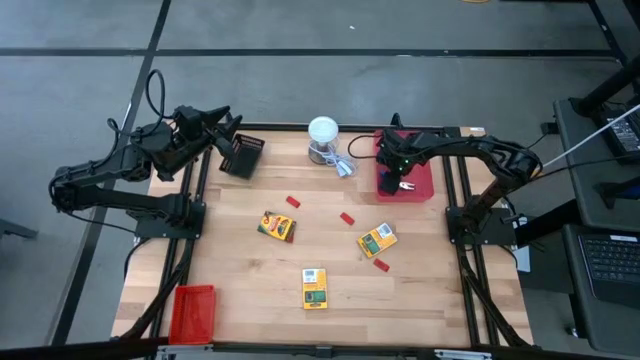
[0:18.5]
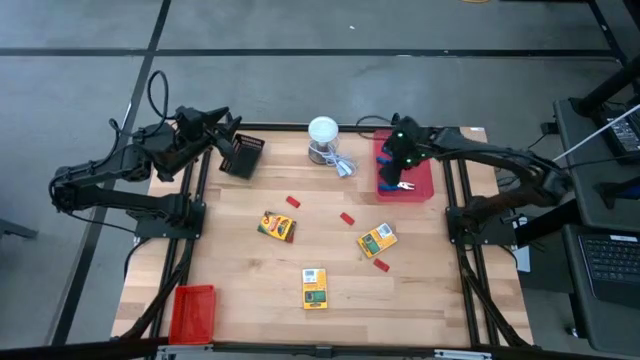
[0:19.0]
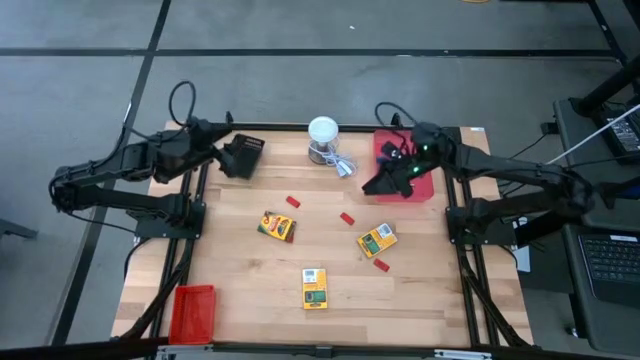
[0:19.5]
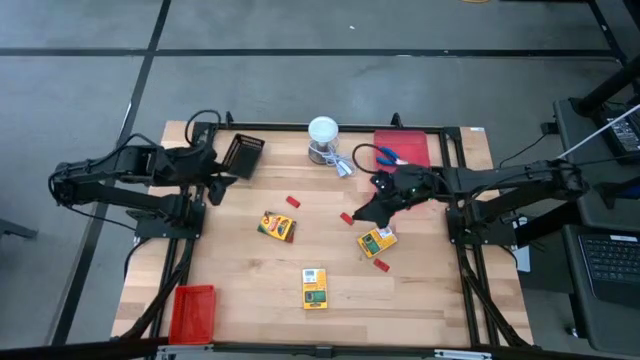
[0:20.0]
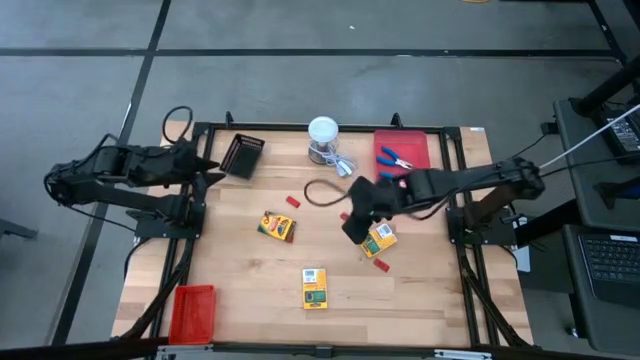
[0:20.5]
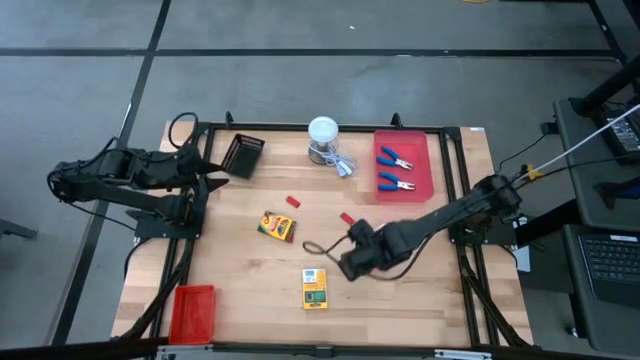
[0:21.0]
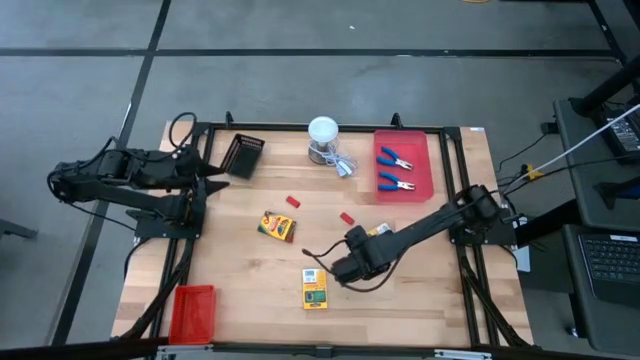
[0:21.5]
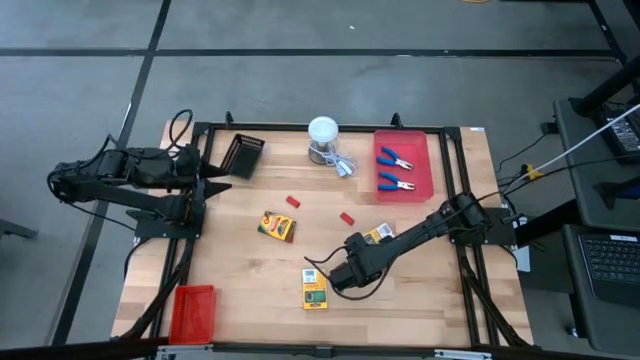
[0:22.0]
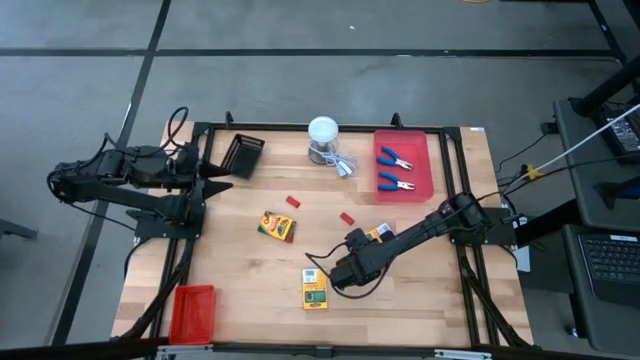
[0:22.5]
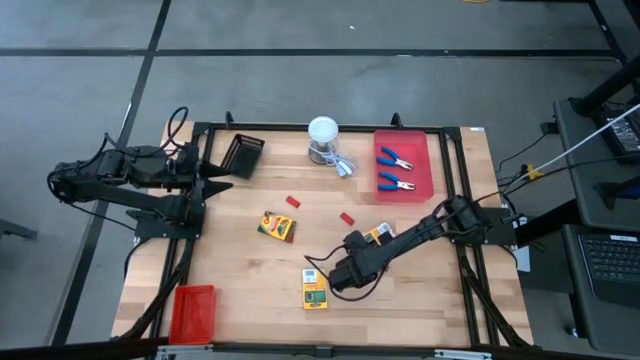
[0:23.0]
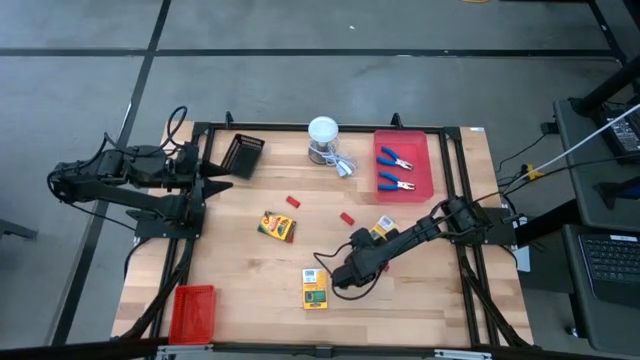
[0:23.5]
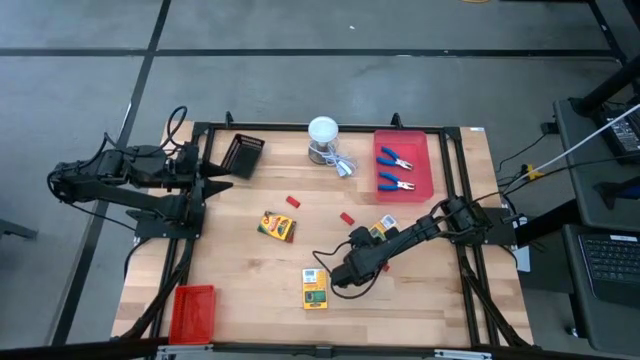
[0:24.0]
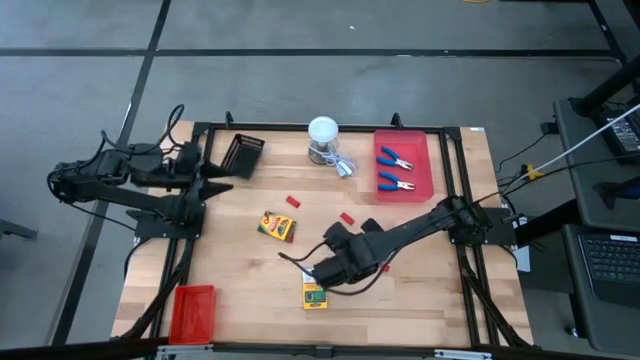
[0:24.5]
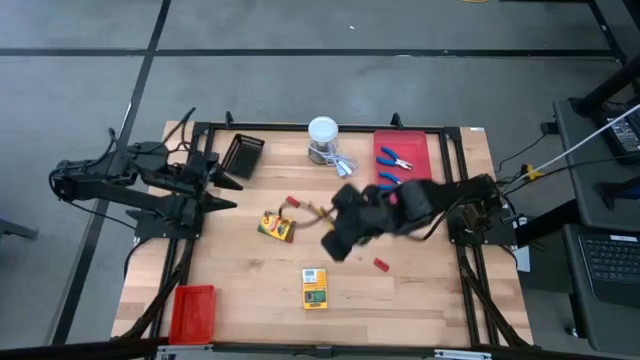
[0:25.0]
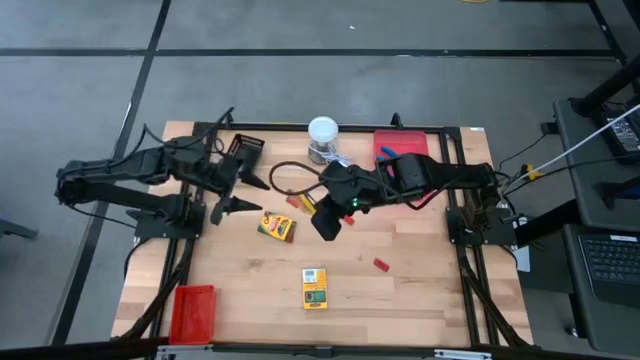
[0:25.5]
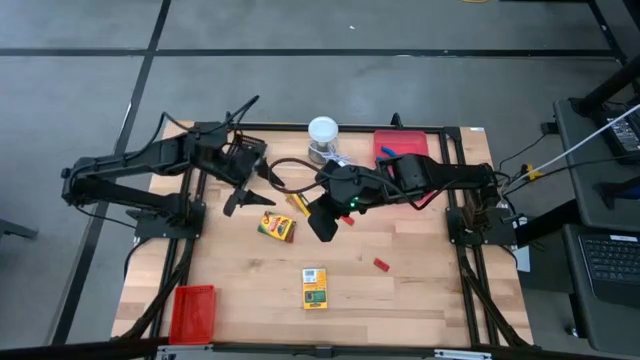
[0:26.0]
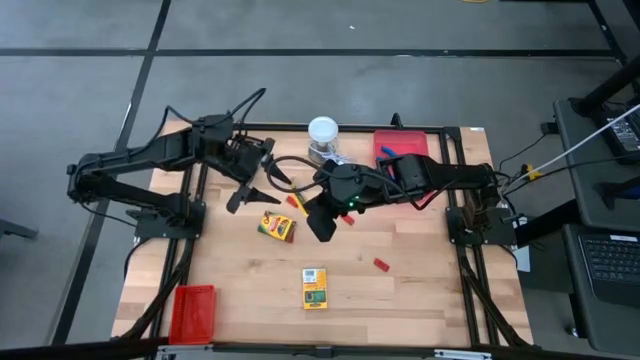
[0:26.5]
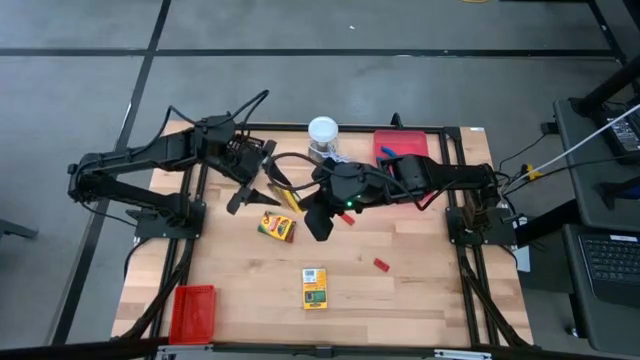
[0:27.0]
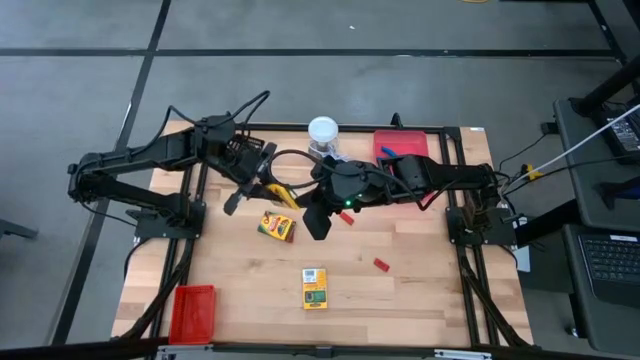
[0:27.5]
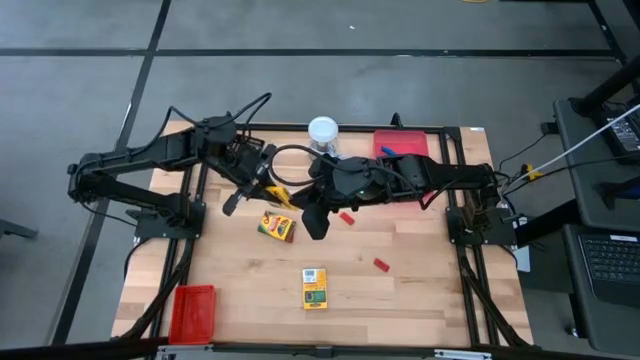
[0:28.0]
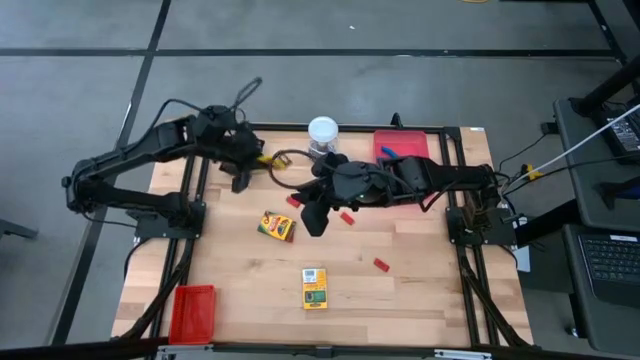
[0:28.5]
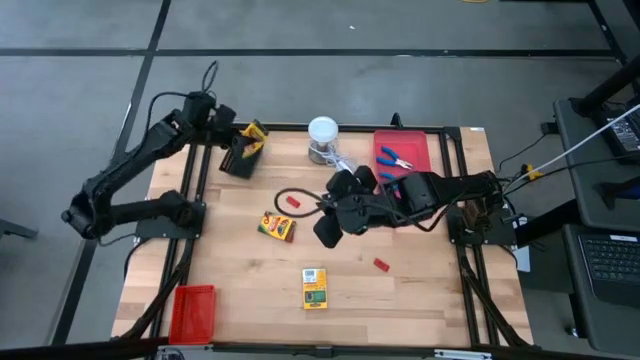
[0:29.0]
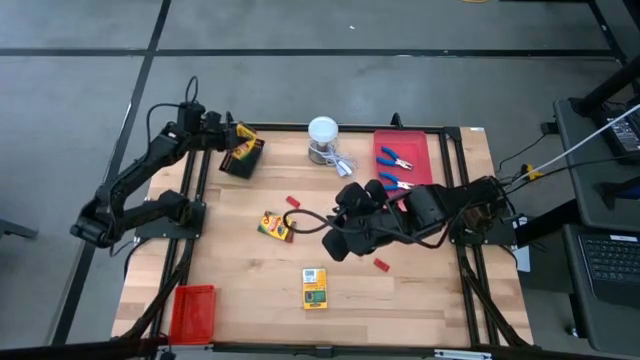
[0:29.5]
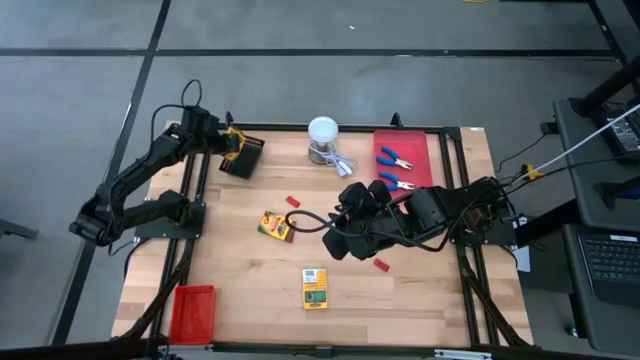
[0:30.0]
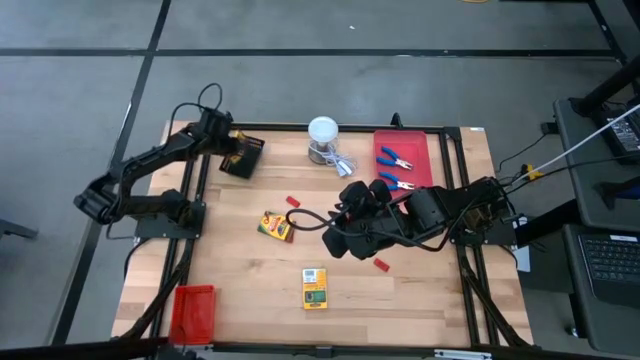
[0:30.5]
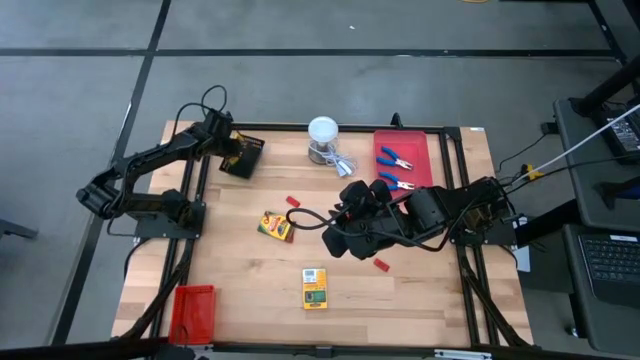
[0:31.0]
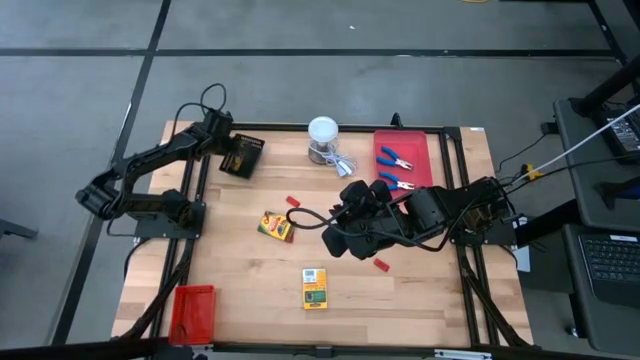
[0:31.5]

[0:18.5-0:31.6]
Task: Pick & Place School Supplies
Put the crayon box into the black bin

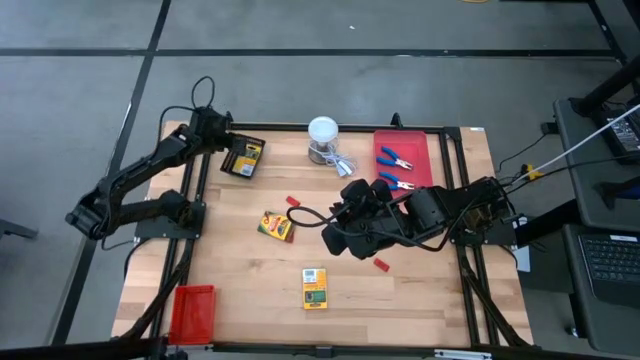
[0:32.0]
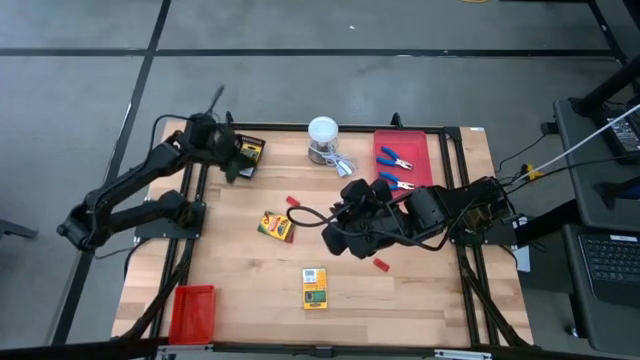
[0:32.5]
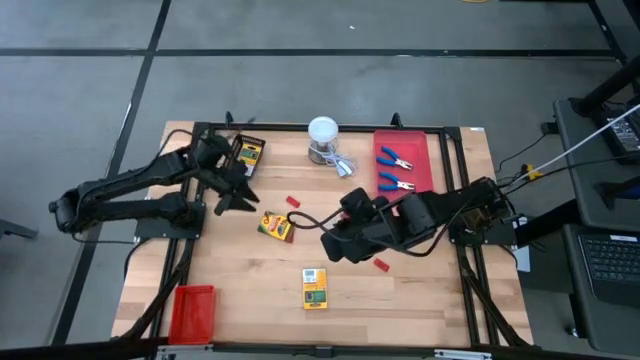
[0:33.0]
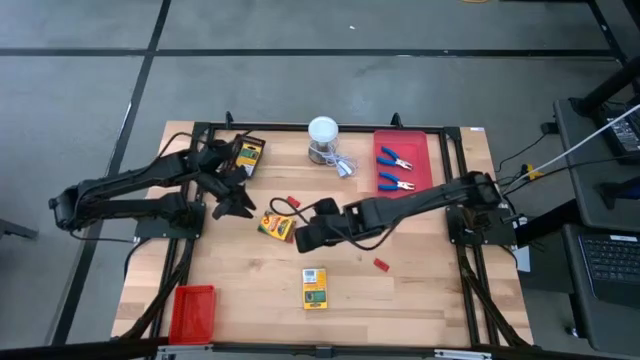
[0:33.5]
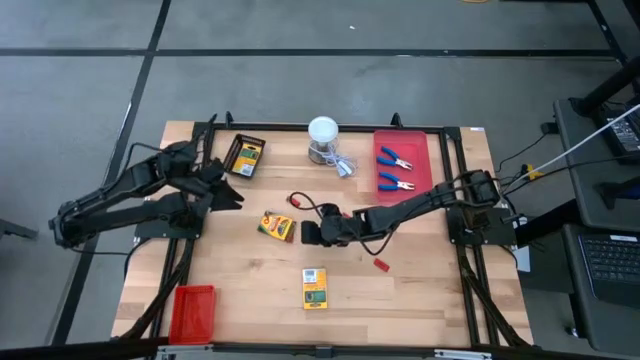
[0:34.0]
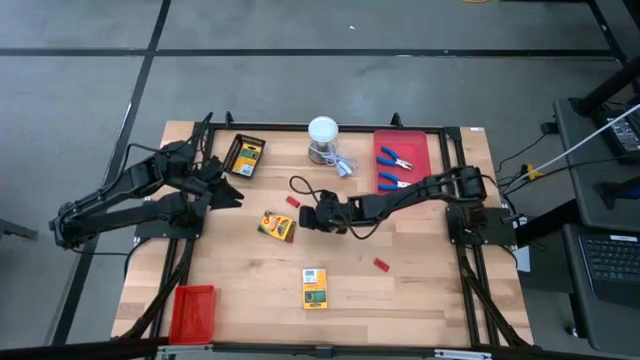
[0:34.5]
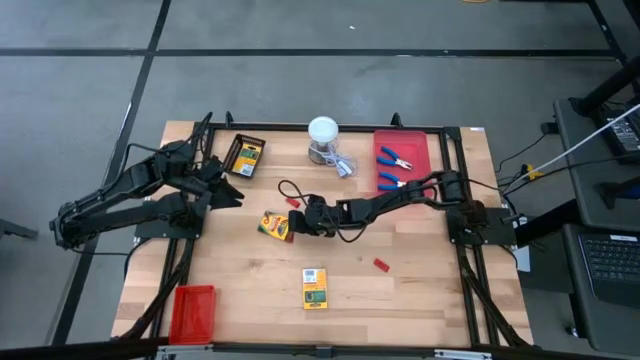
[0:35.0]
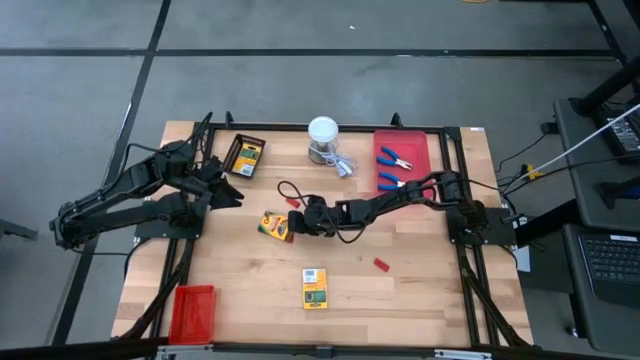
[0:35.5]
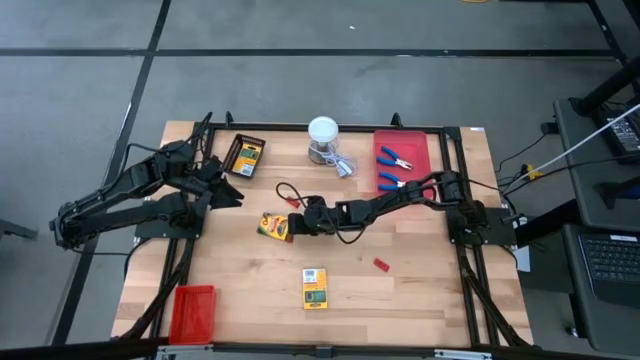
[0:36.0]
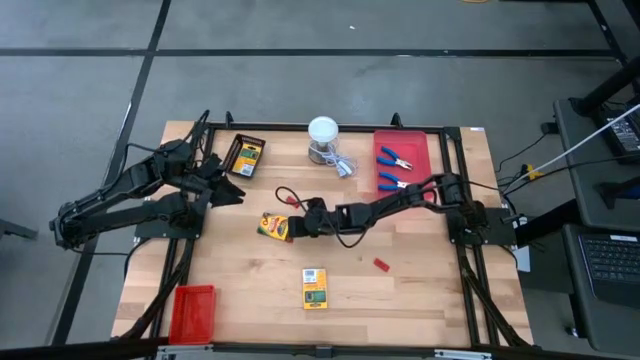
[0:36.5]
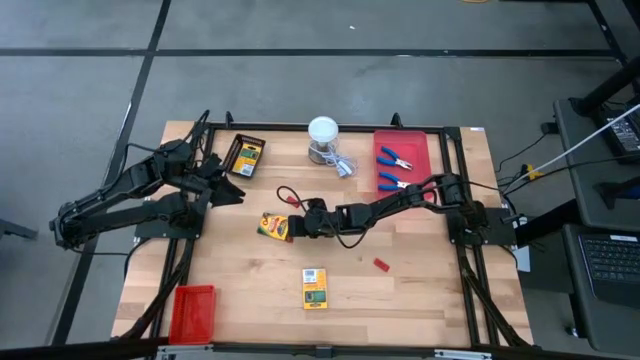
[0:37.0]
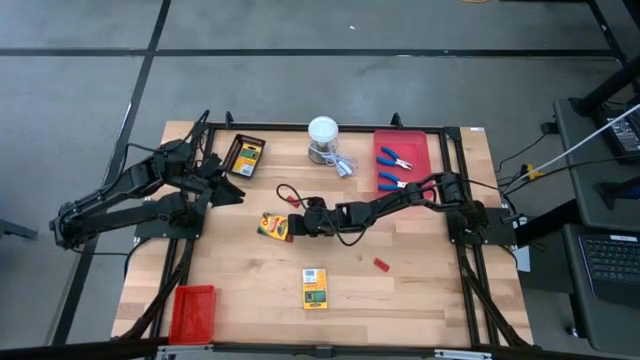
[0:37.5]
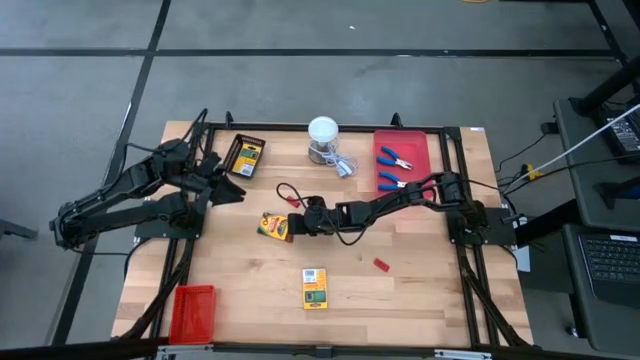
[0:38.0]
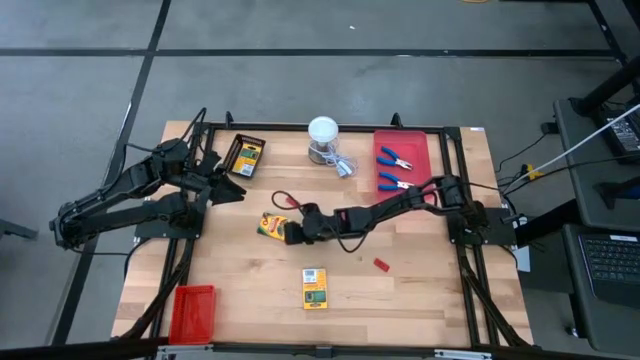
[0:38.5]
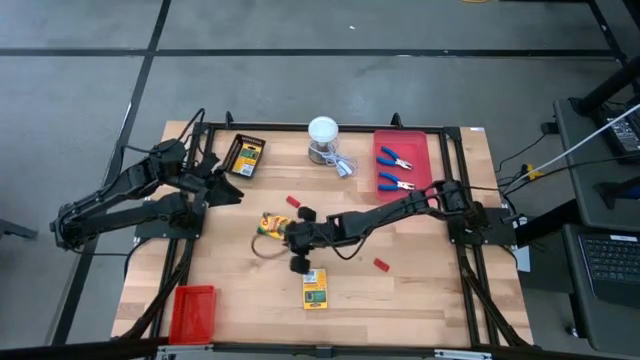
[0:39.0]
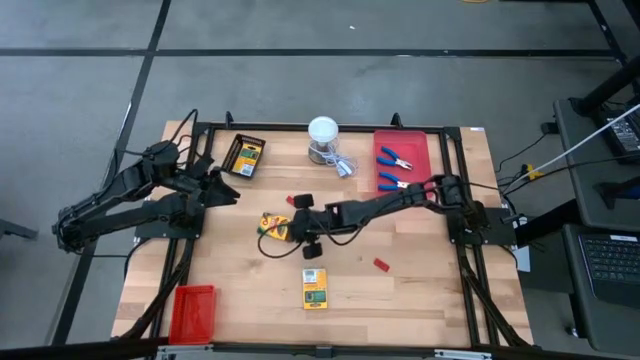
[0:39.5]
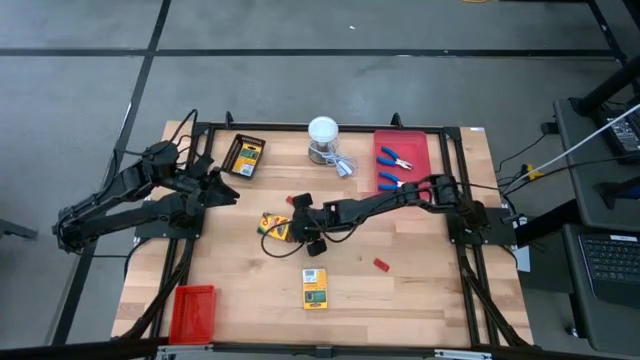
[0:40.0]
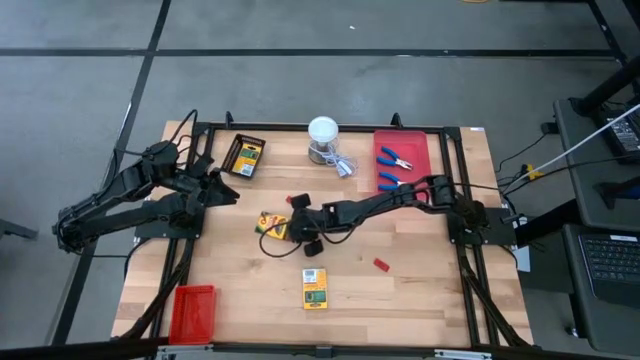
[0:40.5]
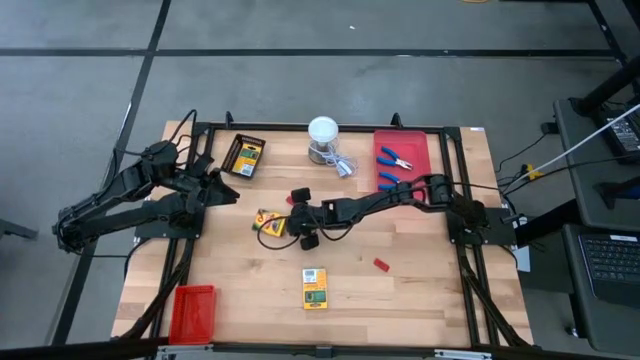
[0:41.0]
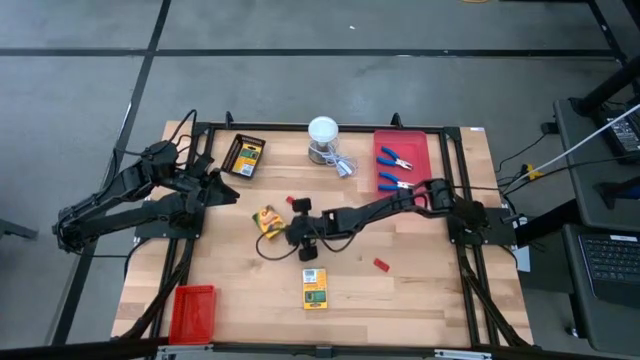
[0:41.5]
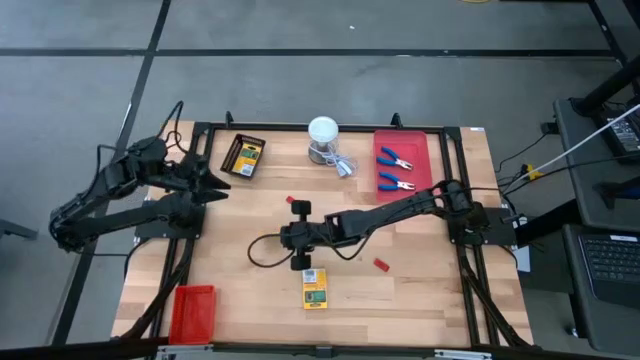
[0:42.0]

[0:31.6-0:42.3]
Put the crayon box into the black bin
